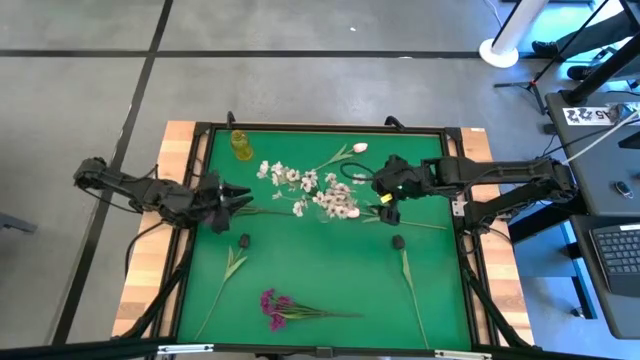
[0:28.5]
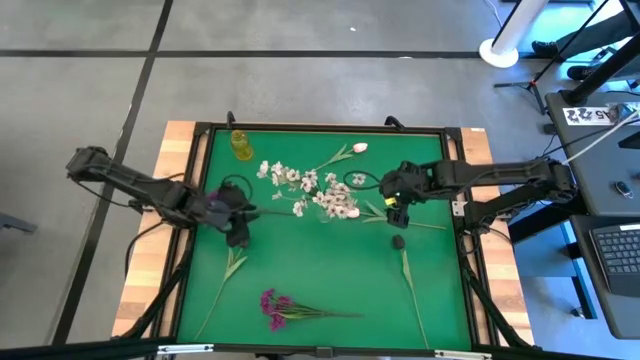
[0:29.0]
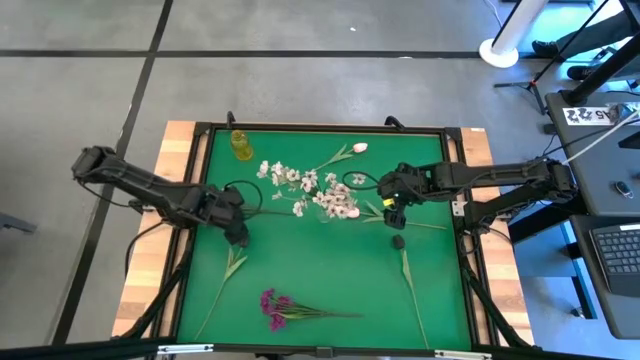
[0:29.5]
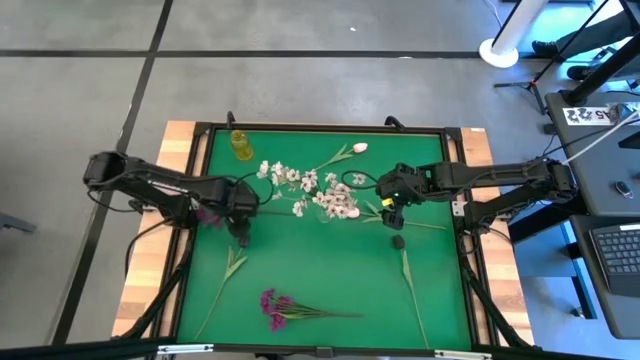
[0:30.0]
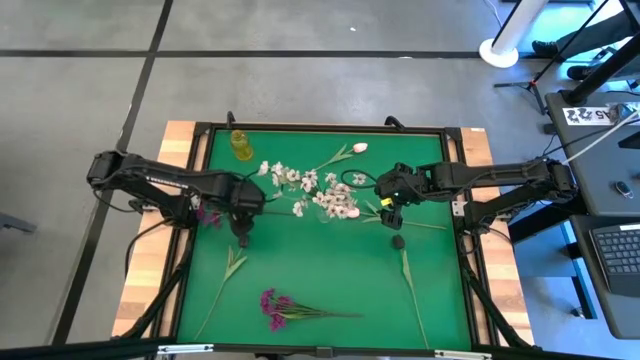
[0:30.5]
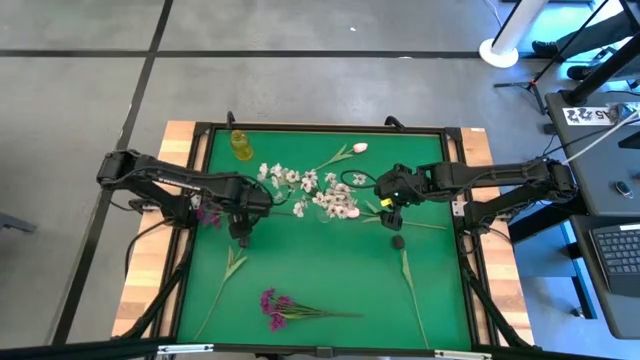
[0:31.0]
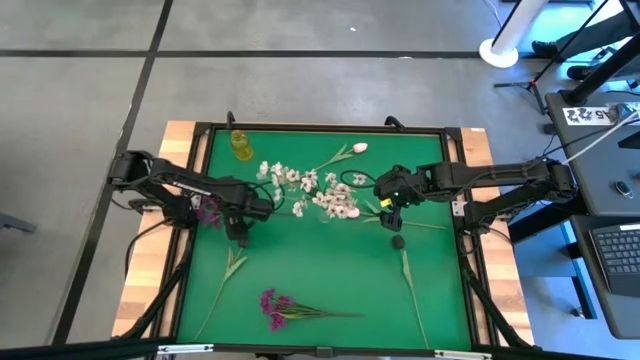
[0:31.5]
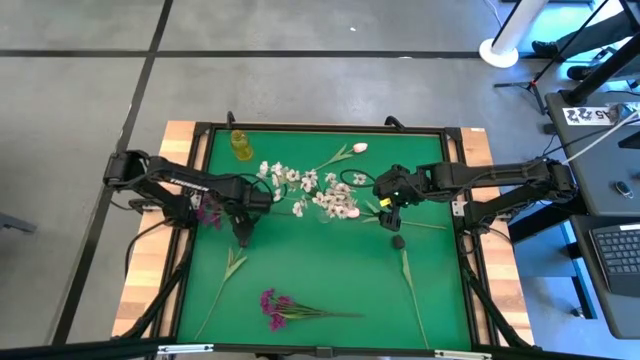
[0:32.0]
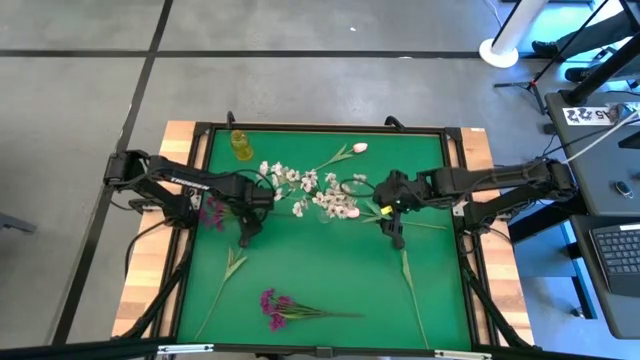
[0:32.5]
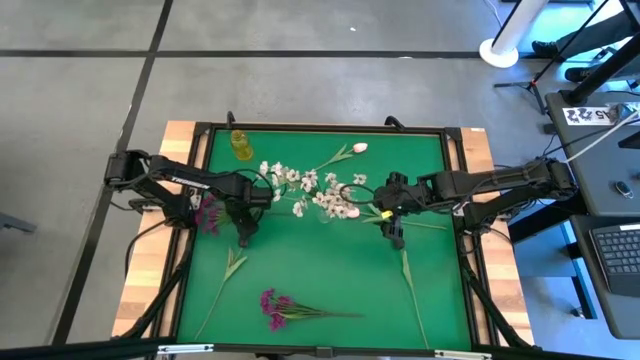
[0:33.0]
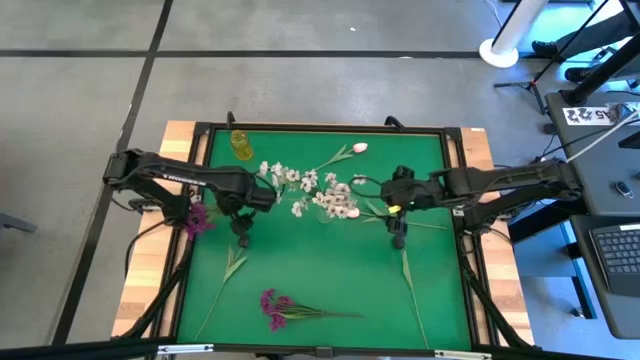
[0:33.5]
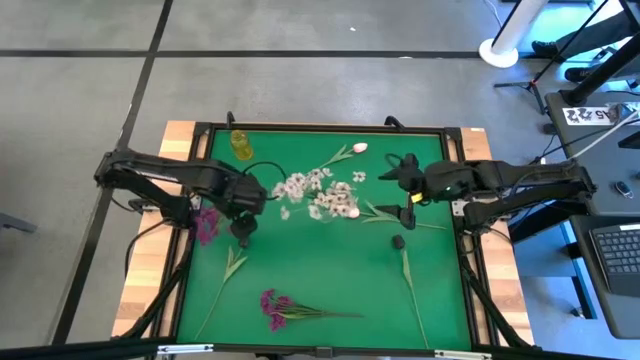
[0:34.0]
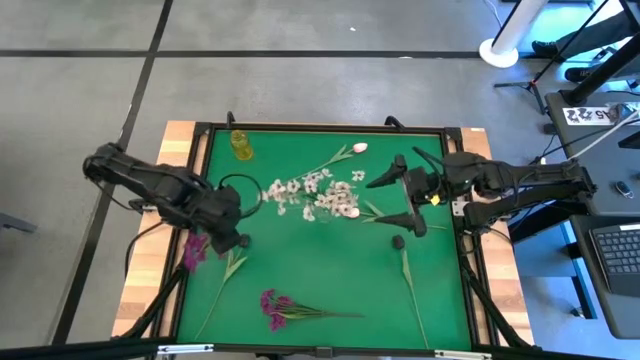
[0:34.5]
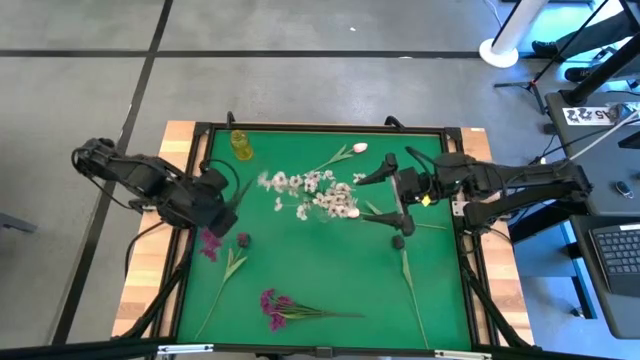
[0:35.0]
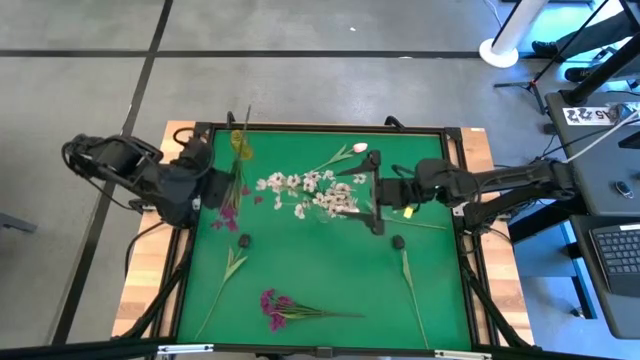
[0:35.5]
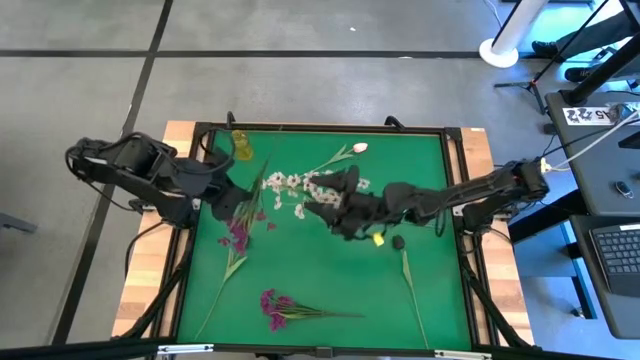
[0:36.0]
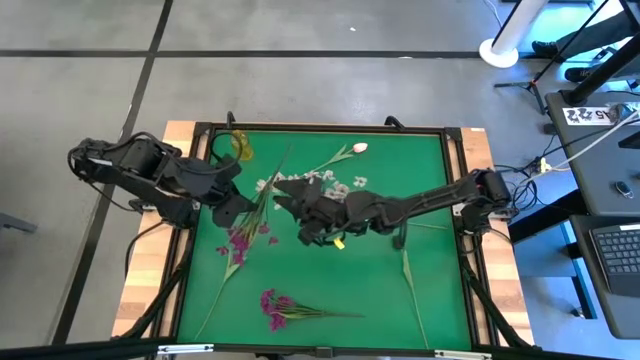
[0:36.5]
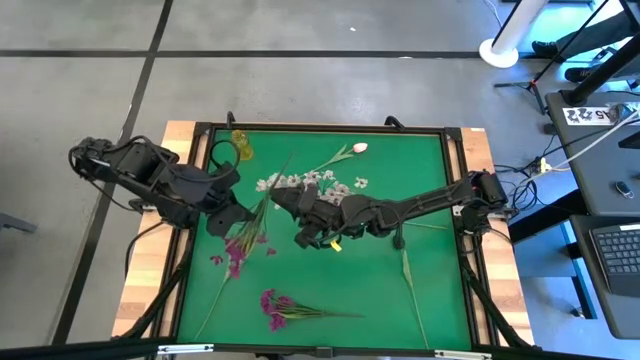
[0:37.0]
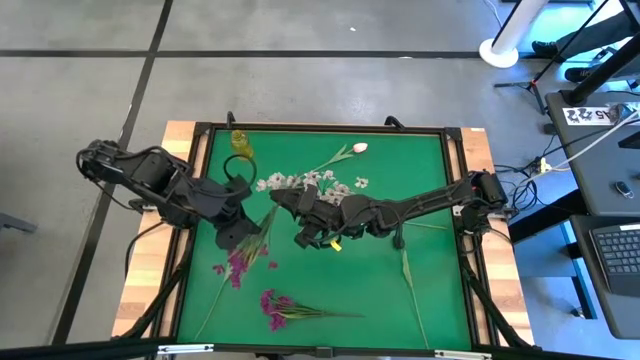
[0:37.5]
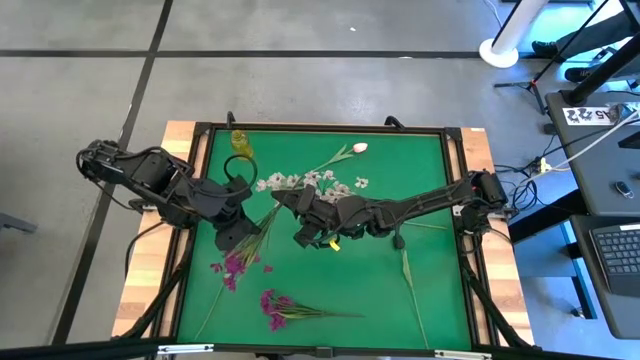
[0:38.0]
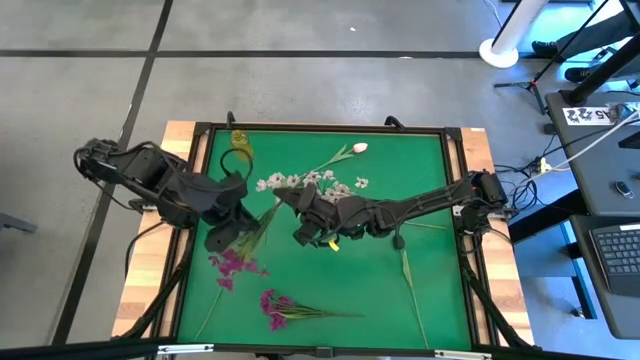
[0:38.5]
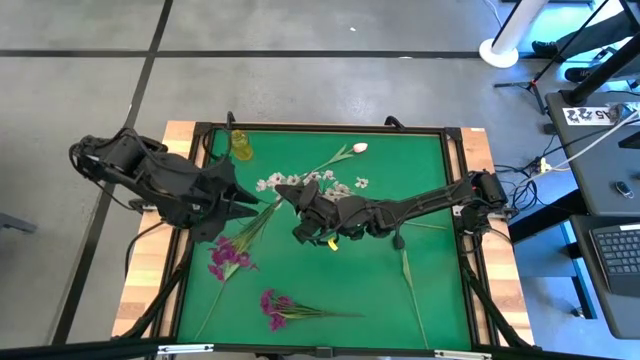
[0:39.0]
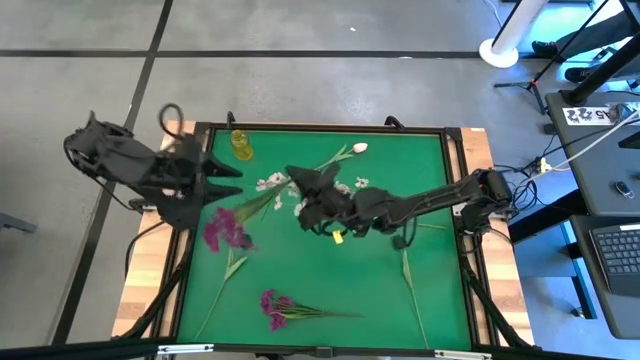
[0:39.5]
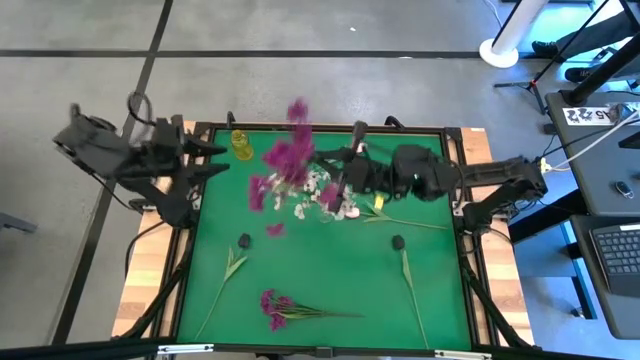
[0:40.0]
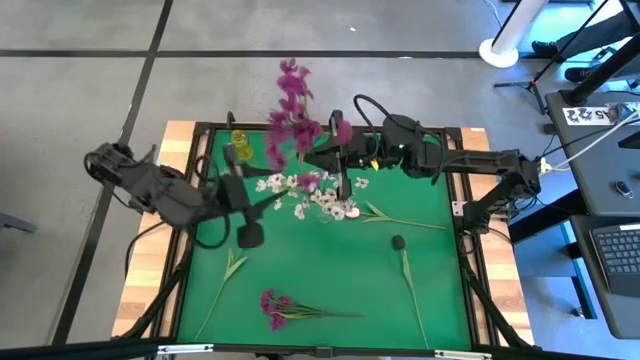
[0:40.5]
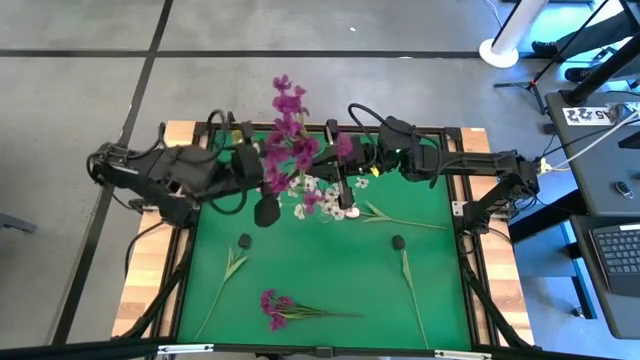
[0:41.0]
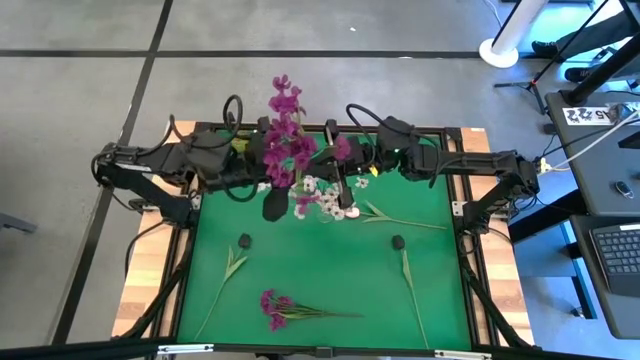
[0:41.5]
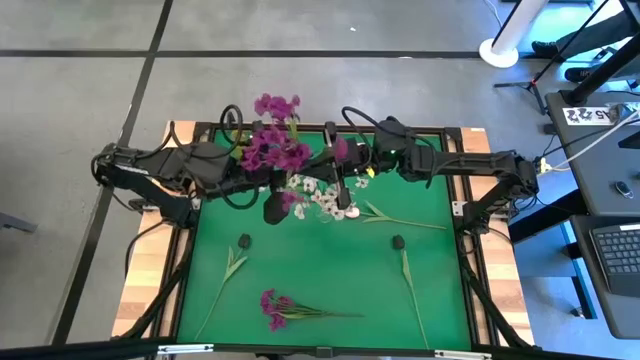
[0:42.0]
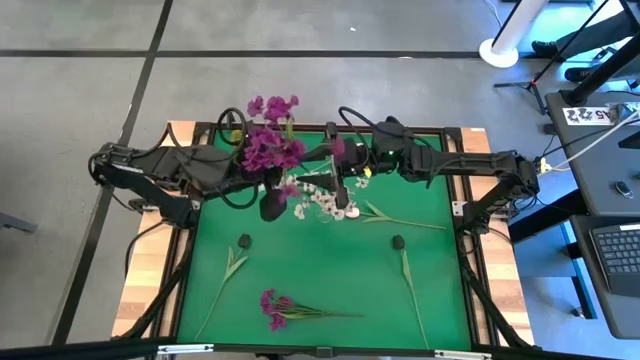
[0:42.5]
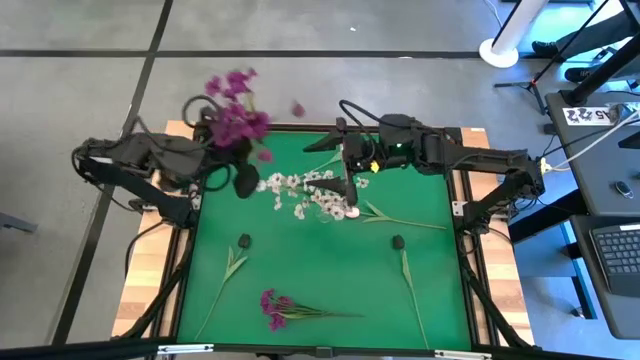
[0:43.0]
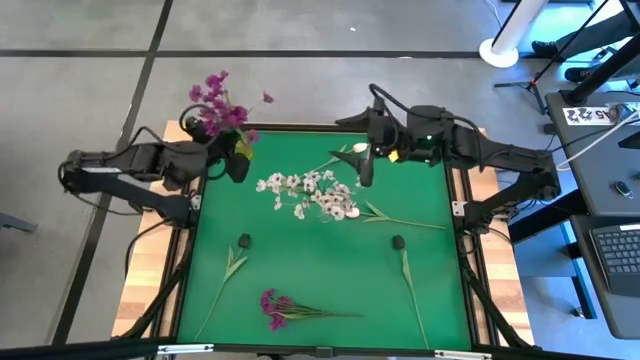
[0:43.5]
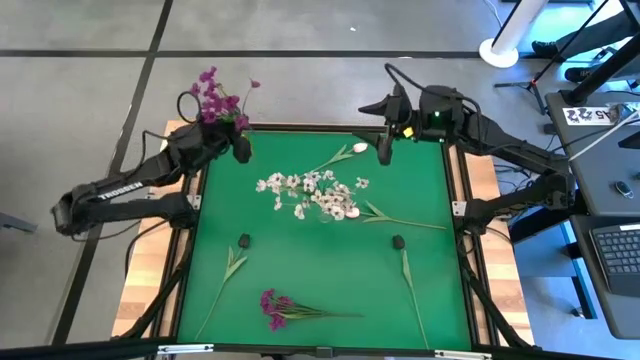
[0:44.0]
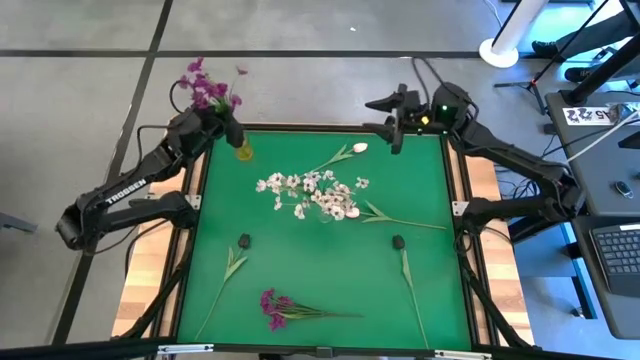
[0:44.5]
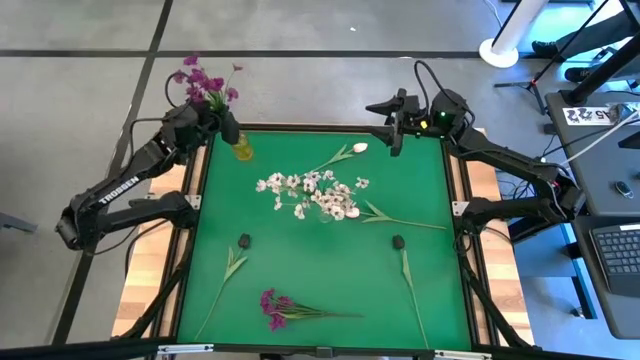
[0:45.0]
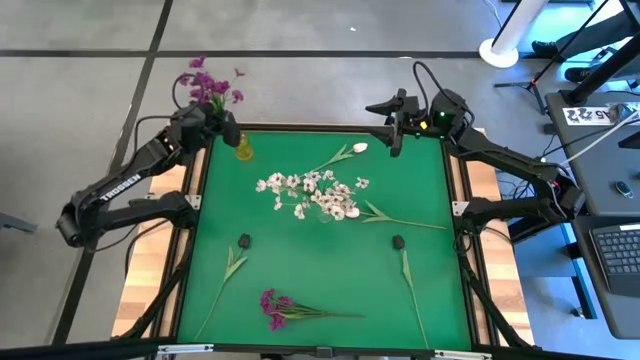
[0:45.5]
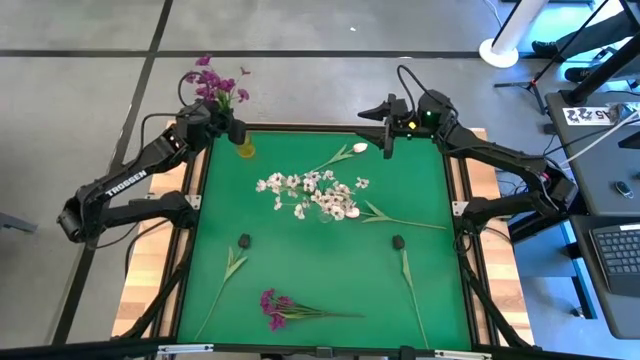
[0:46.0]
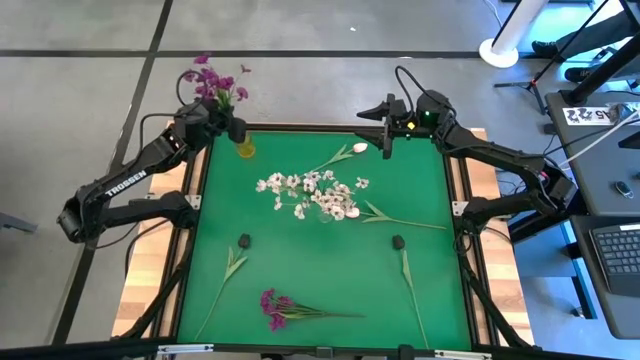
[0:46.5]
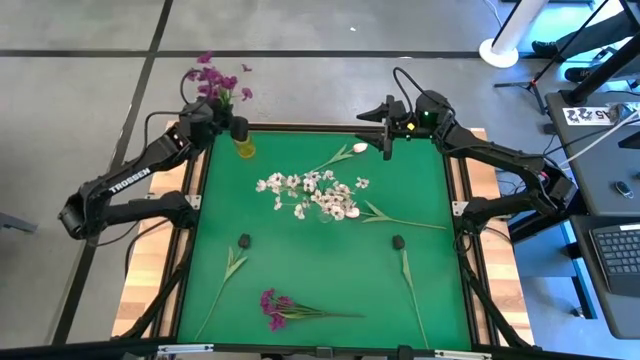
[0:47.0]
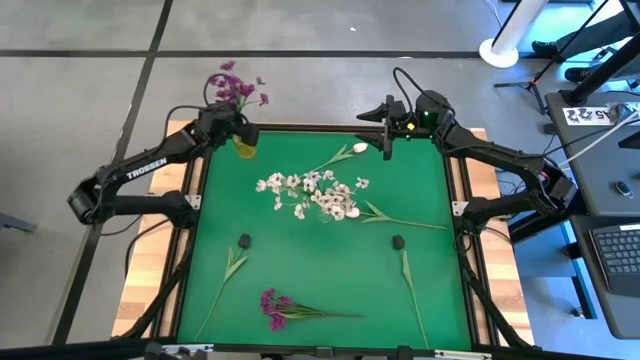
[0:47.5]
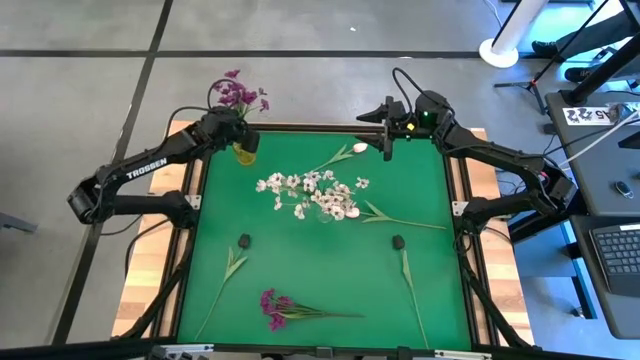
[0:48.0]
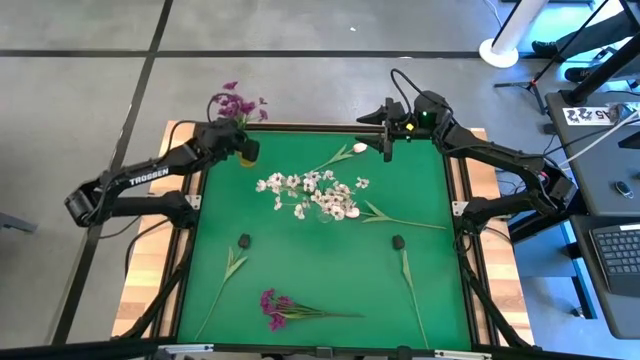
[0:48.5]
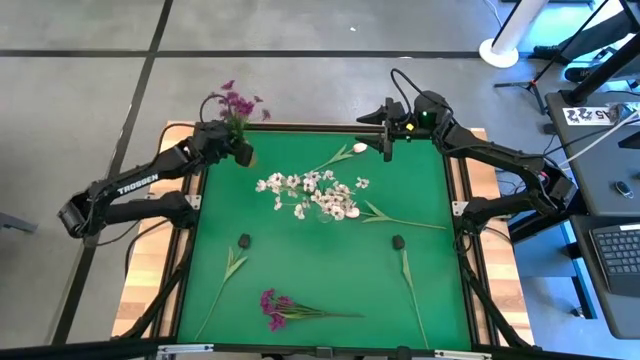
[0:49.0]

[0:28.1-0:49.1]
Task: Sort flowers into vase by color
Put the top purple flowers into the yellow vase
